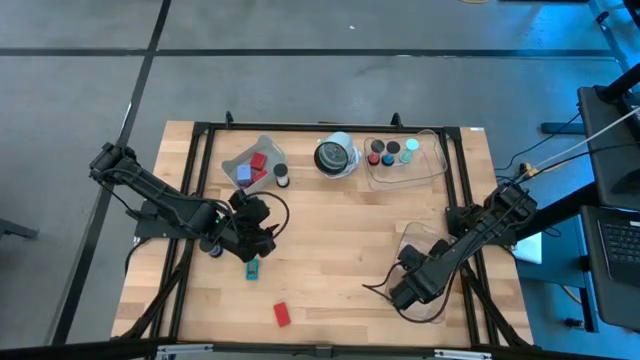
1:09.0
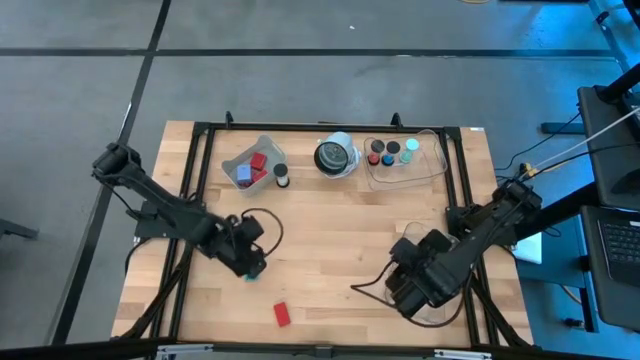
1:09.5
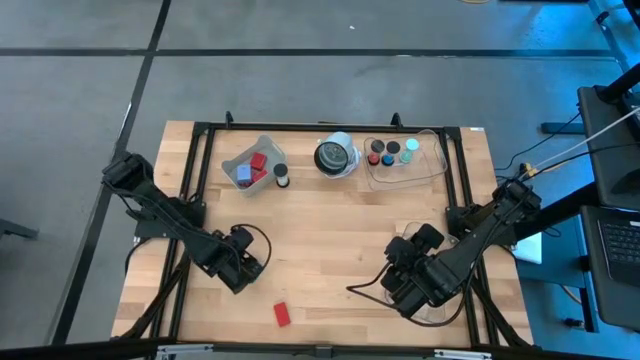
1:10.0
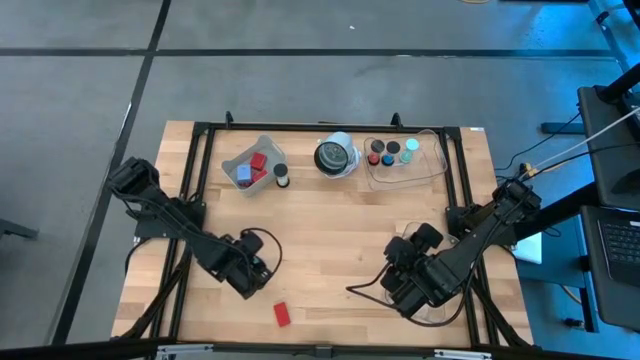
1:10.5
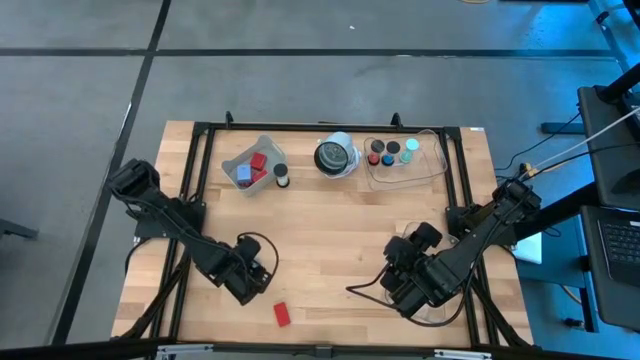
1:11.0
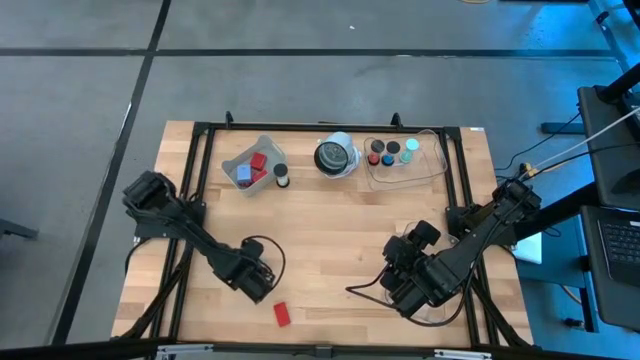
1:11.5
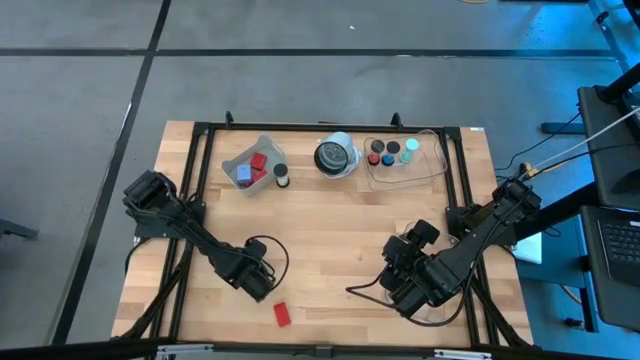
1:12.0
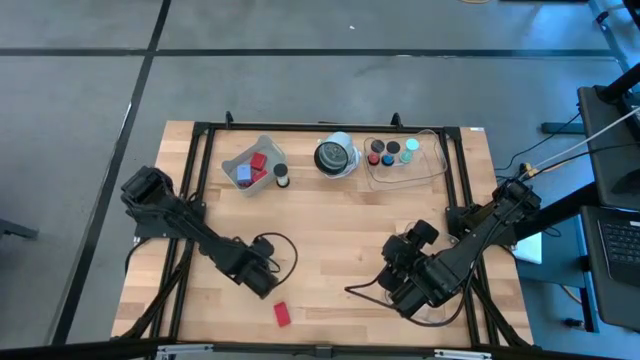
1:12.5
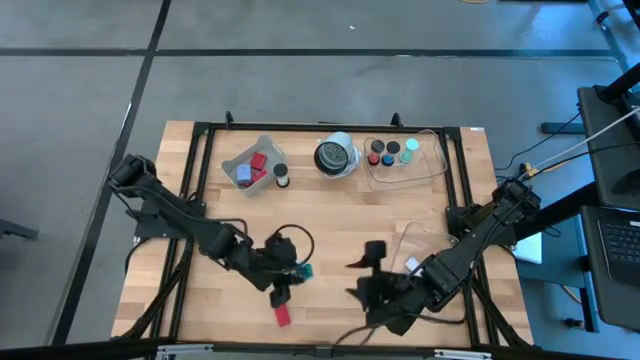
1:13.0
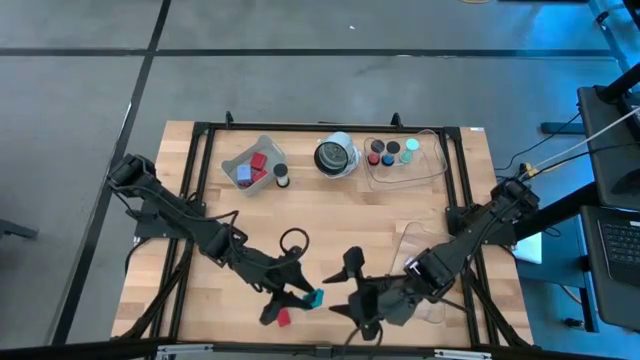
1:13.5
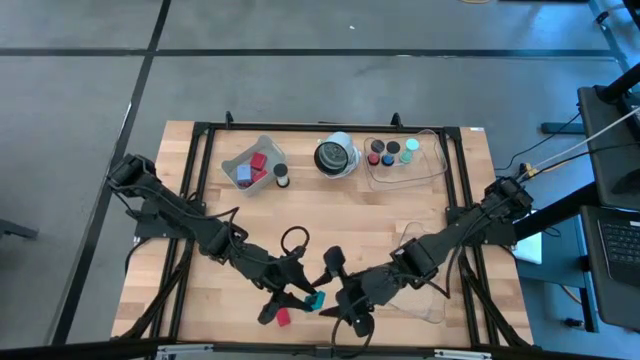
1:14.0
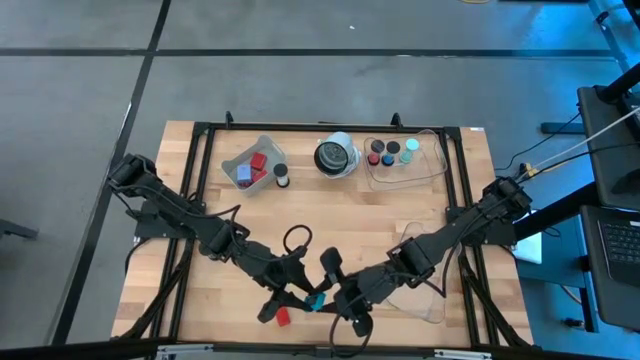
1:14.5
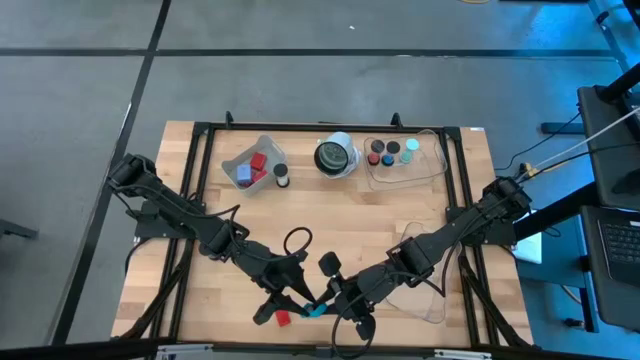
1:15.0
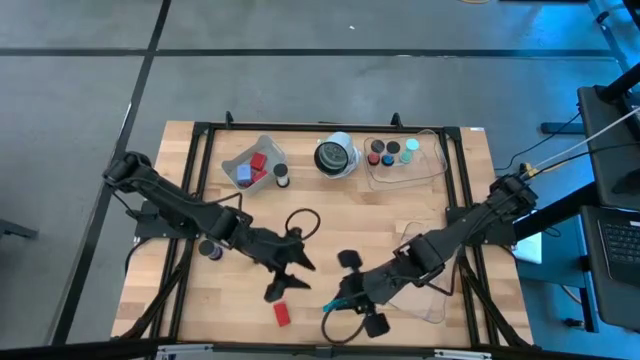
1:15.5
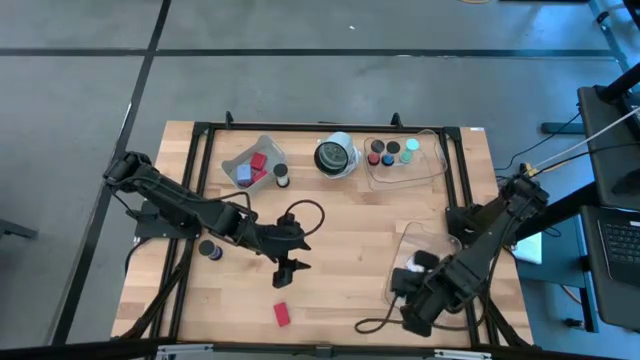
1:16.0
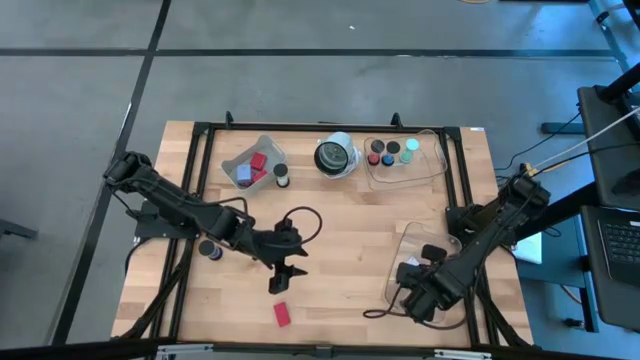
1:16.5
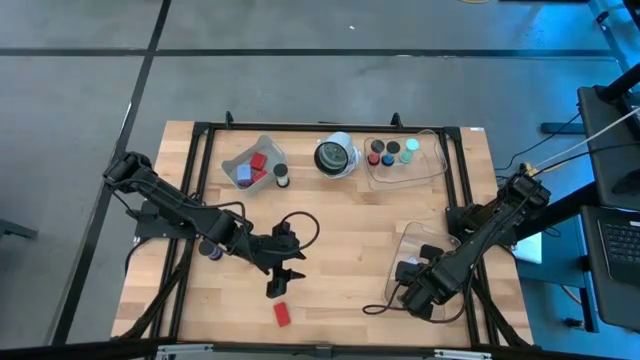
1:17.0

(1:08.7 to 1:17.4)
Task: Pick & Place Office items
Put the white digital clock into the bottom transparent bin

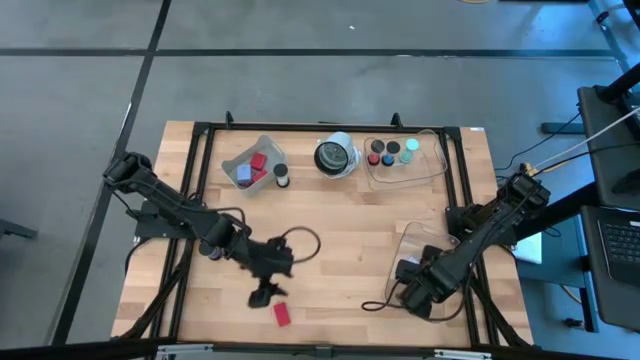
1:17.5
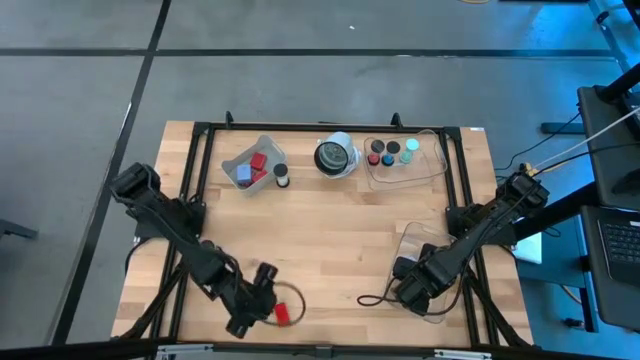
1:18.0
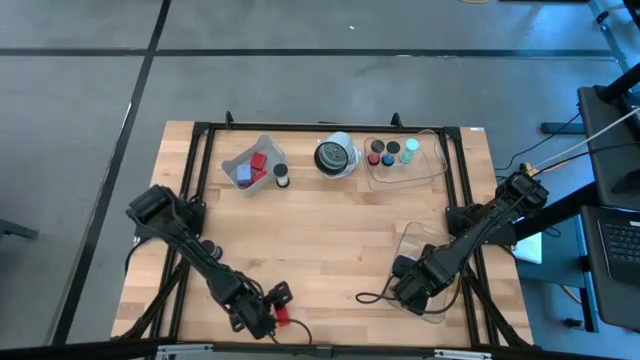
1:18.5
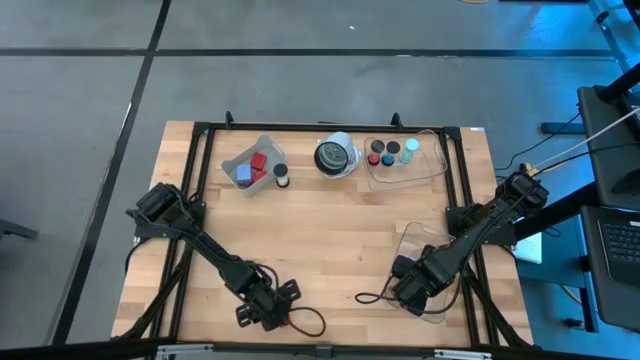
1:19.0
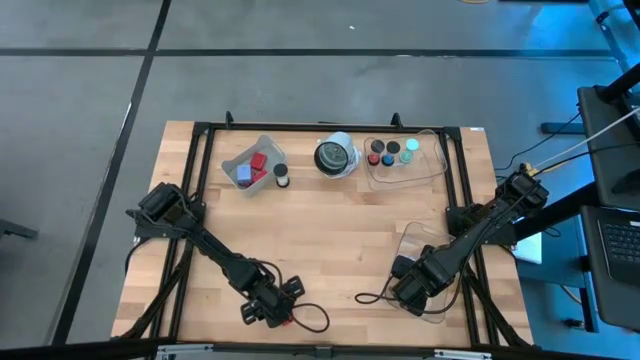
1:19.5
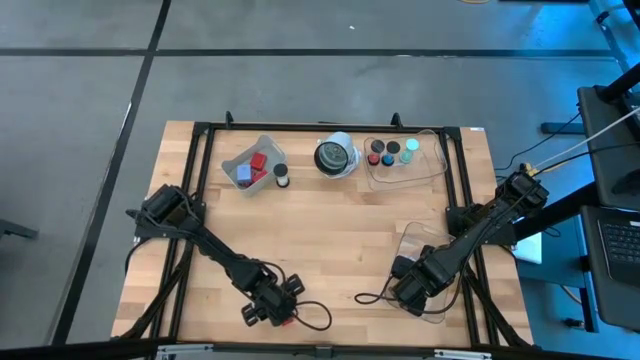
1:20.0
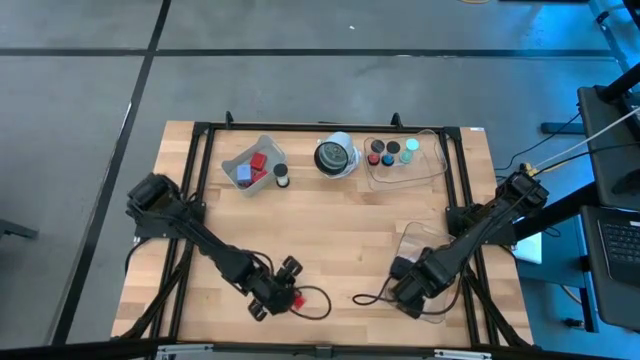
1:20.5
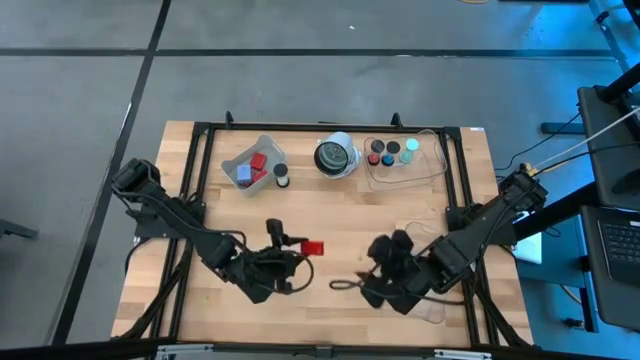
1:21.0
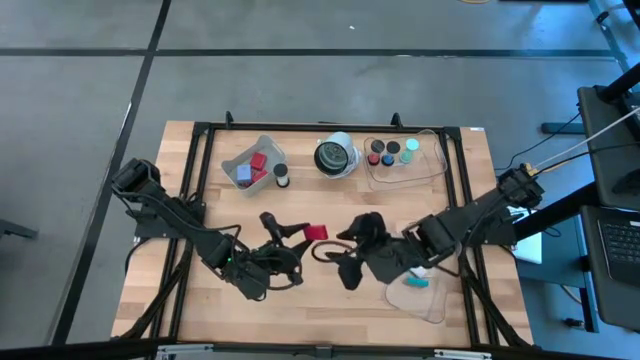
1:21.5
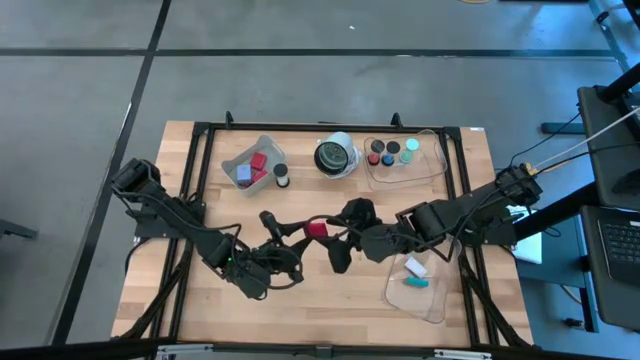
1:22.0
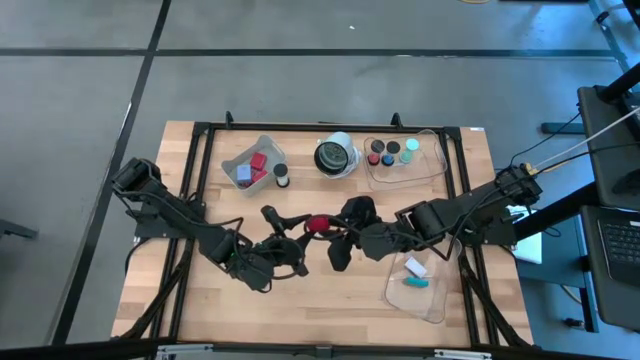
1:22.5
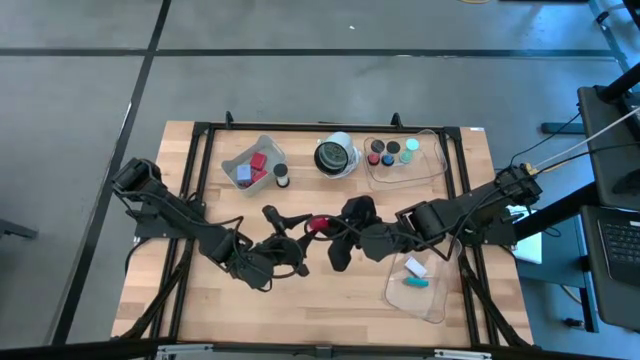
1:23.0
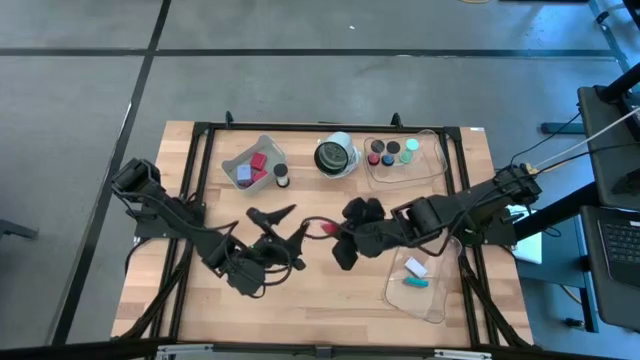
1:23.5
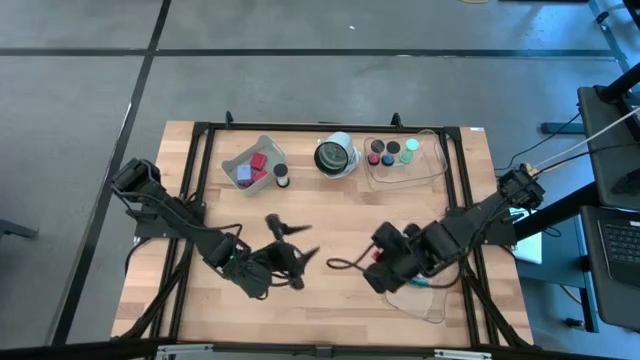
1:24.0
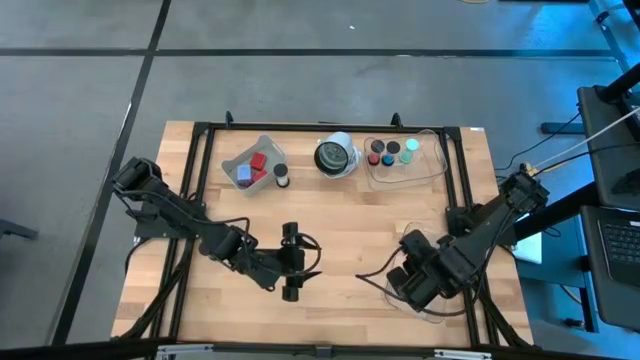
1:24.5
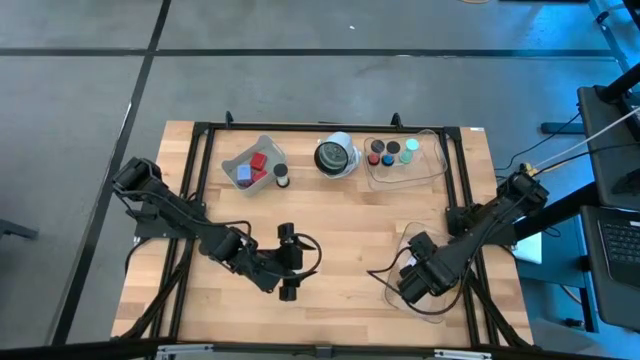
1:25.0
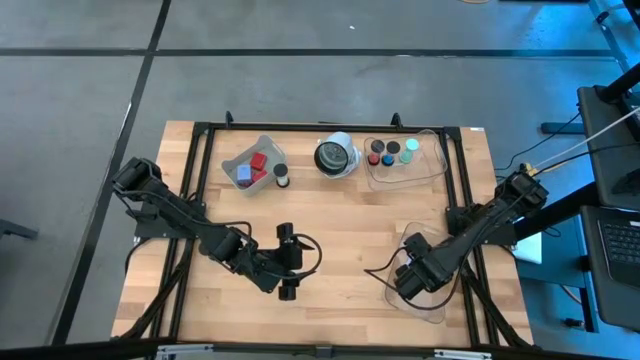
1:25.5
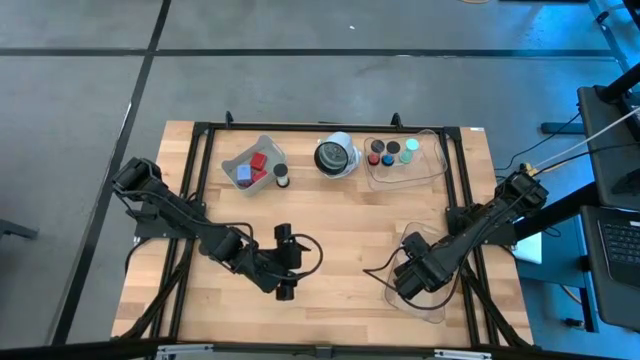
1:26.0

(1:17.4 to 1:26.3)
Put the red digital clock into the bottom transparent bin

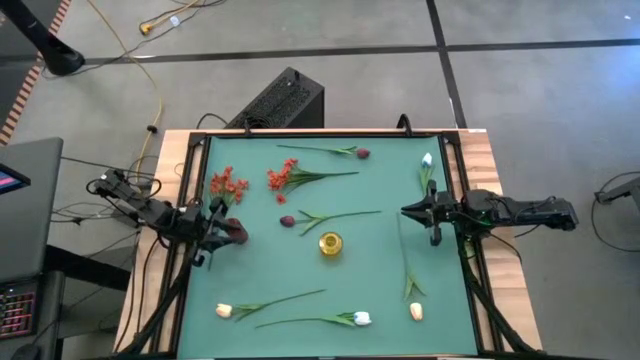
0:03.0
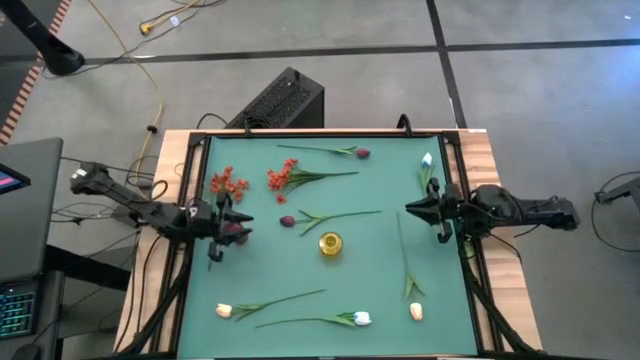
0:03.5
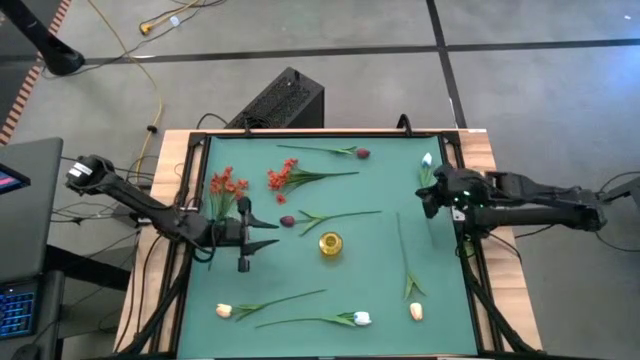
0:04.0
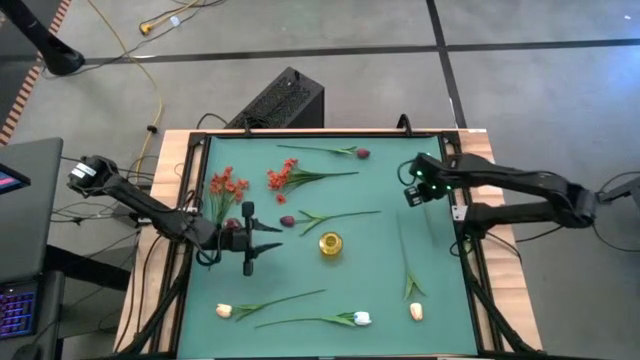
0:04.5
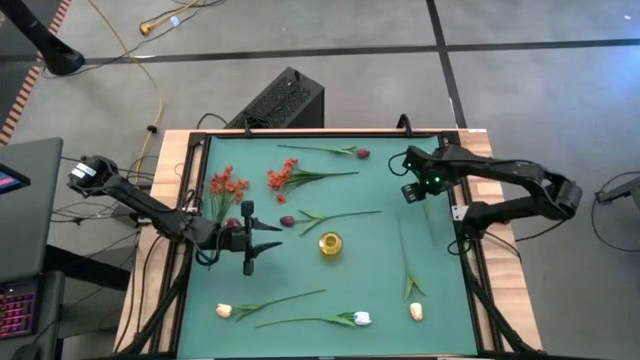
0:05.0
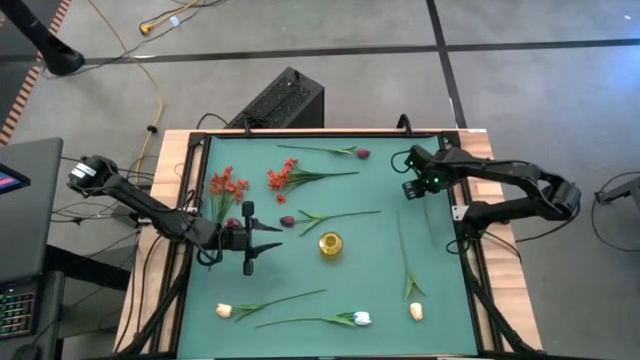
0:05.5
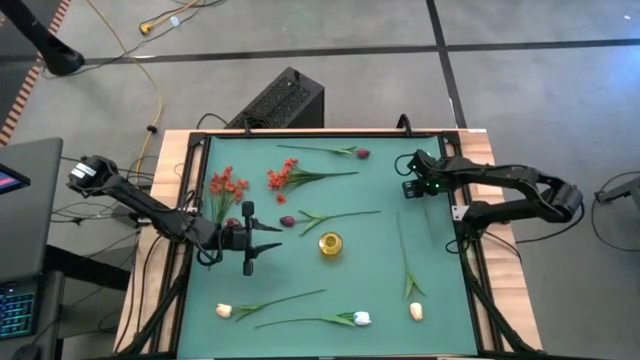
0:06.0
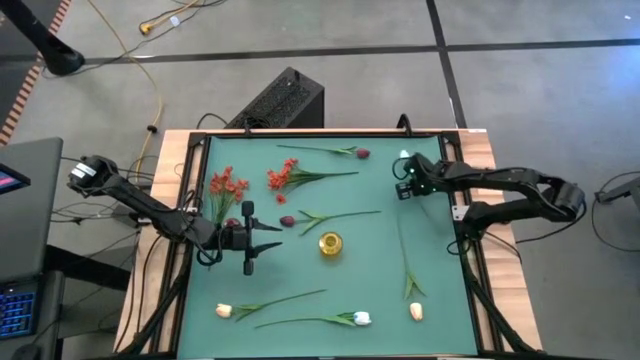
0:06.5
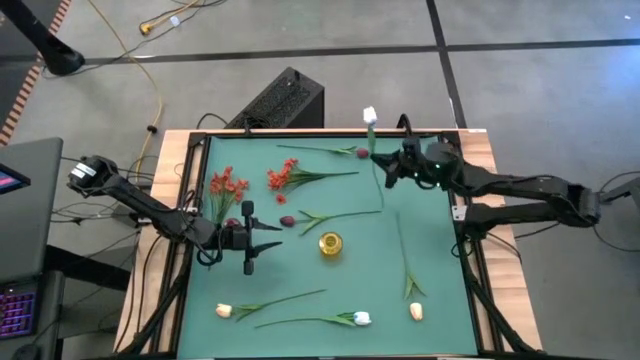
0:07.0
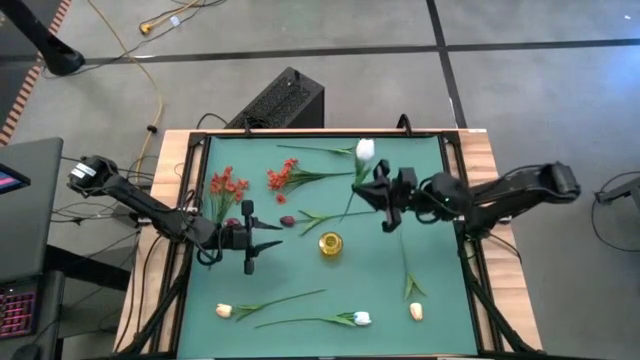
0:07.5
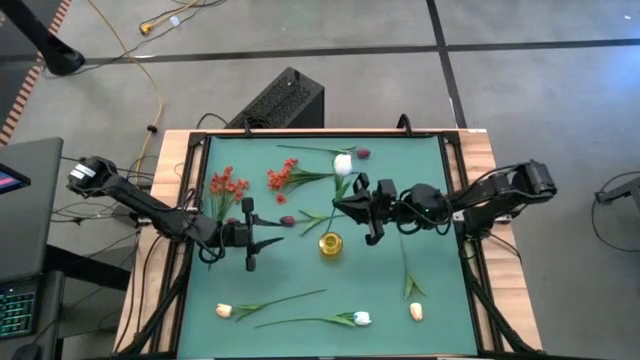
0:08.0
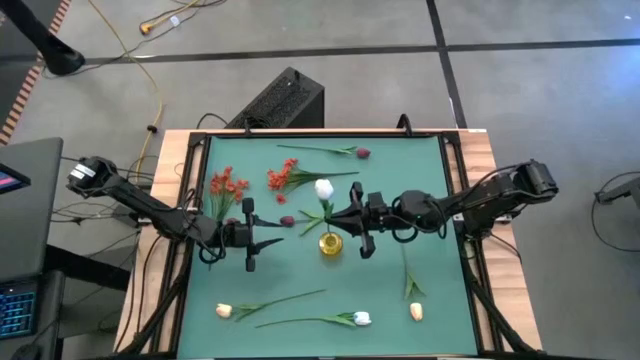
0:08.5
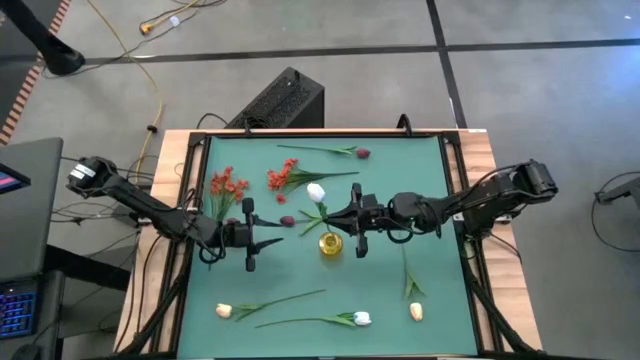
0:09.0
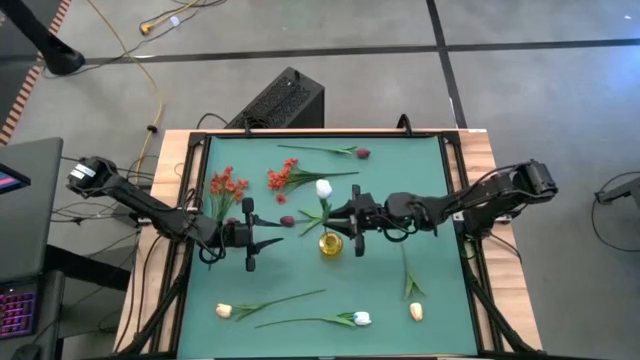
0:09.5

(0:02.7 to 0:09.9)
Task: Sort flowers into vase by color
Put the top white flower into the yellow vase
